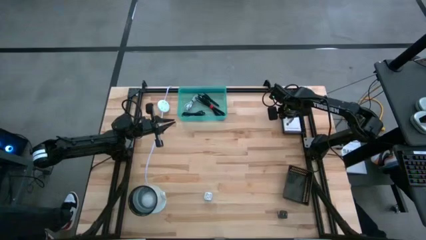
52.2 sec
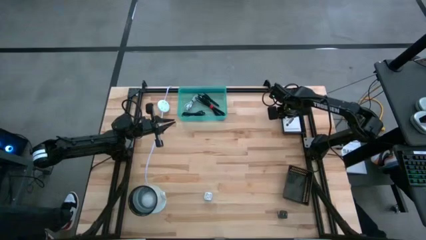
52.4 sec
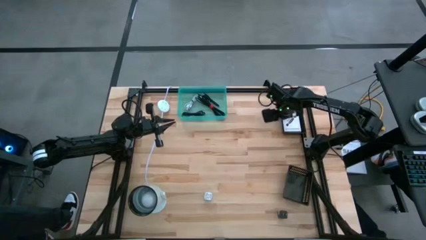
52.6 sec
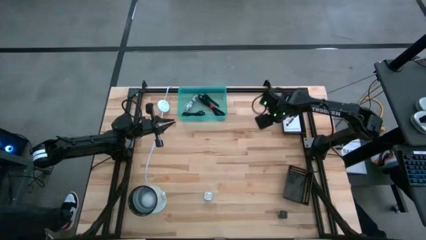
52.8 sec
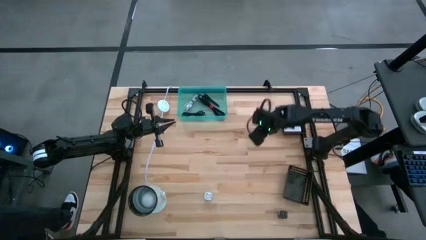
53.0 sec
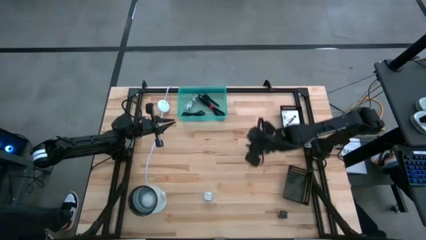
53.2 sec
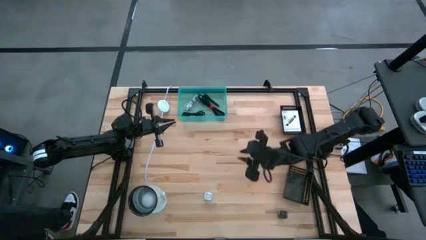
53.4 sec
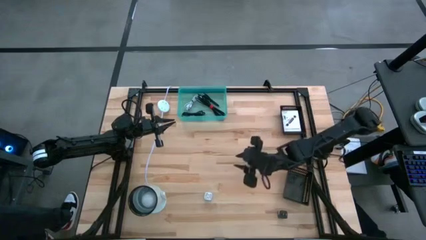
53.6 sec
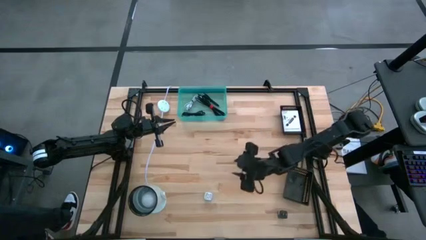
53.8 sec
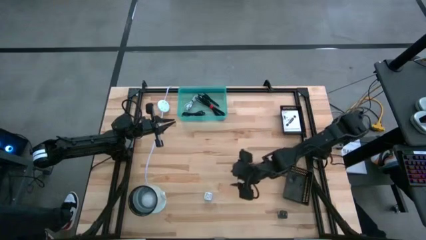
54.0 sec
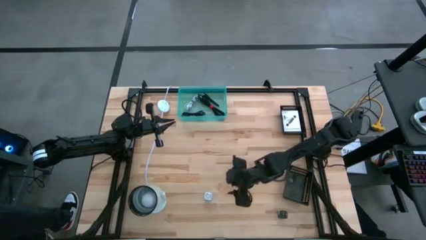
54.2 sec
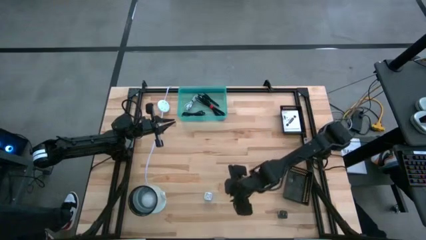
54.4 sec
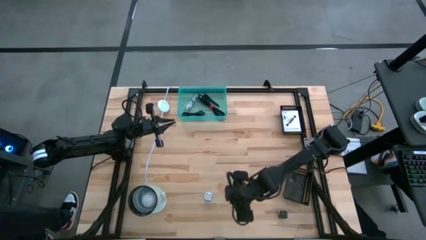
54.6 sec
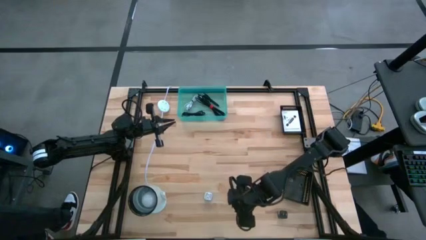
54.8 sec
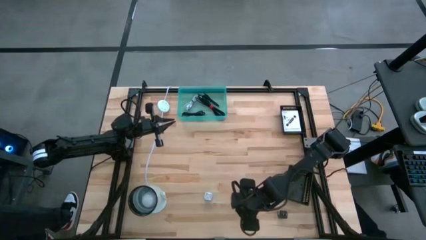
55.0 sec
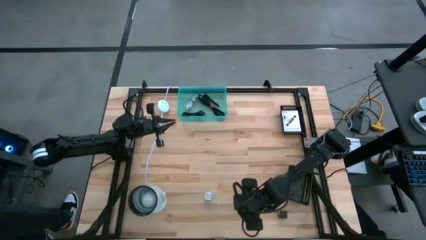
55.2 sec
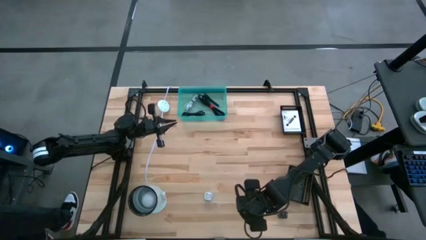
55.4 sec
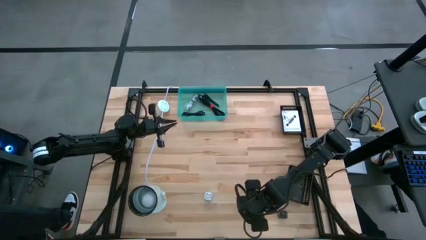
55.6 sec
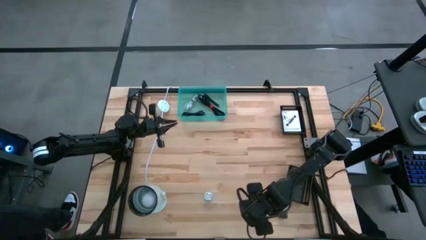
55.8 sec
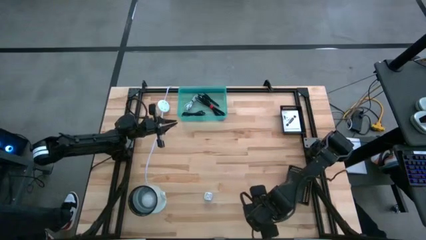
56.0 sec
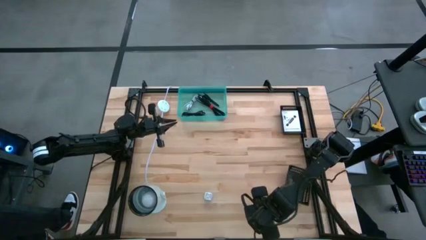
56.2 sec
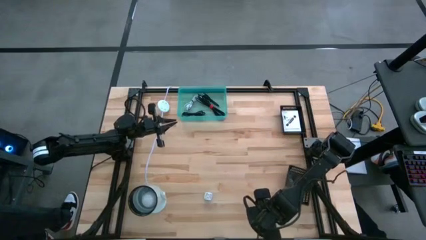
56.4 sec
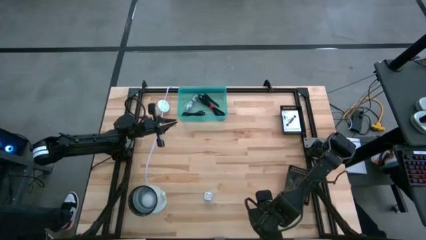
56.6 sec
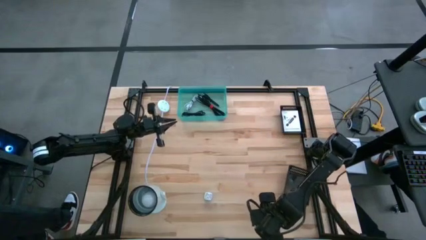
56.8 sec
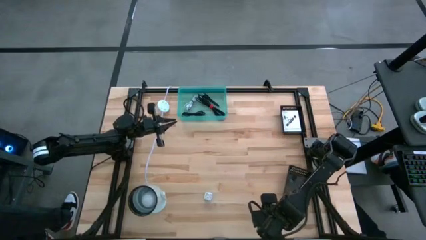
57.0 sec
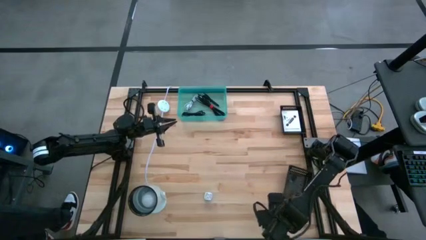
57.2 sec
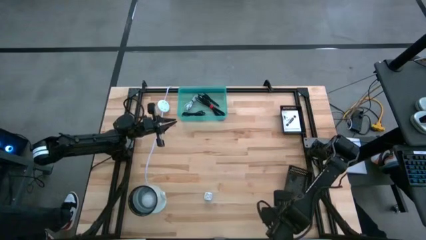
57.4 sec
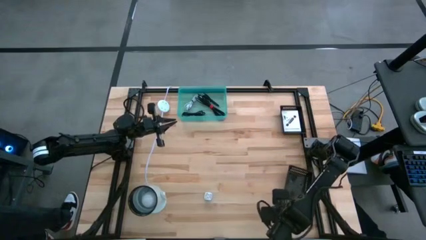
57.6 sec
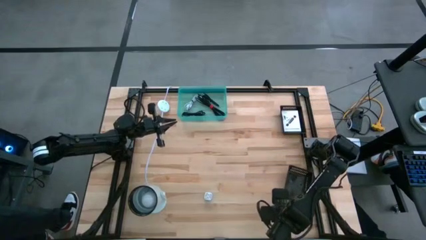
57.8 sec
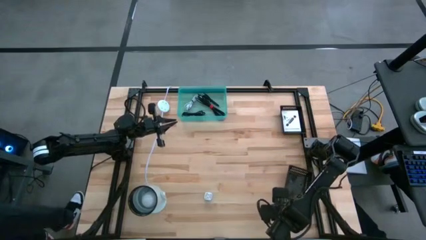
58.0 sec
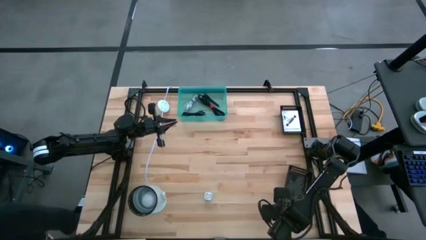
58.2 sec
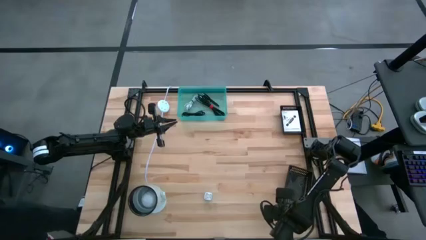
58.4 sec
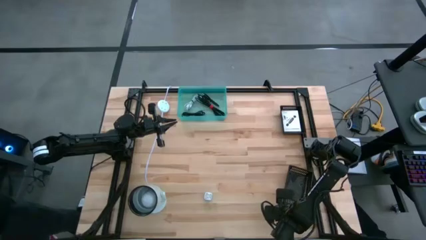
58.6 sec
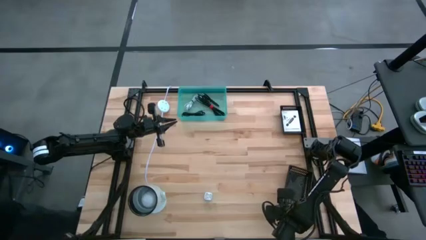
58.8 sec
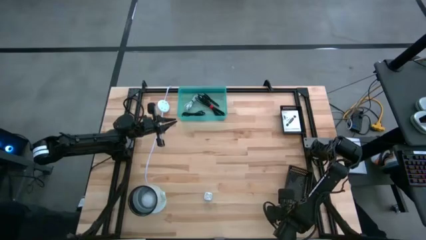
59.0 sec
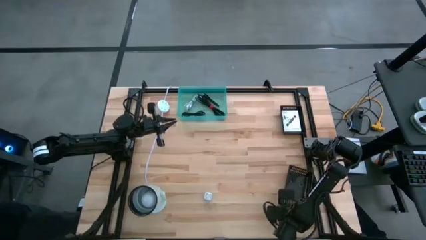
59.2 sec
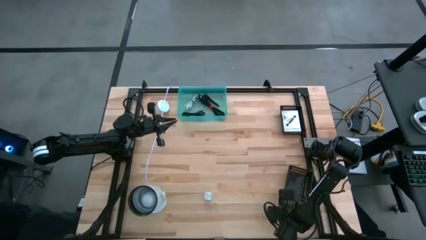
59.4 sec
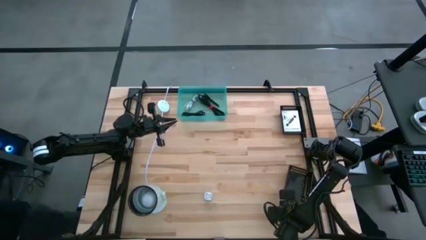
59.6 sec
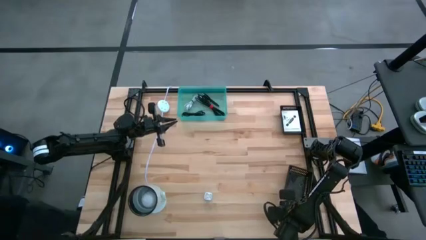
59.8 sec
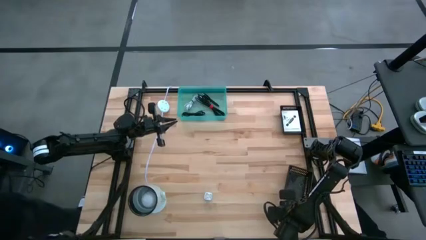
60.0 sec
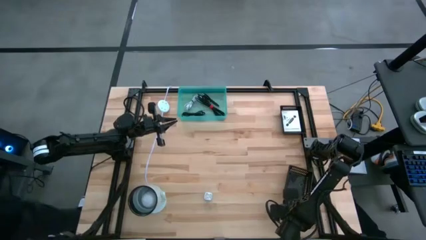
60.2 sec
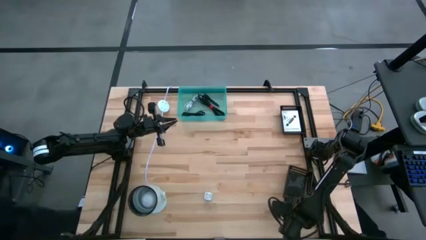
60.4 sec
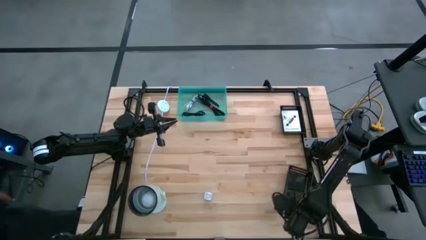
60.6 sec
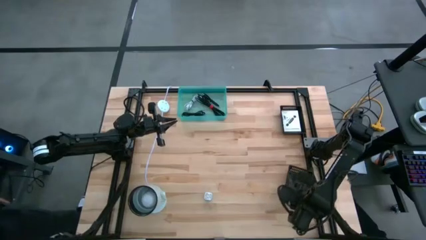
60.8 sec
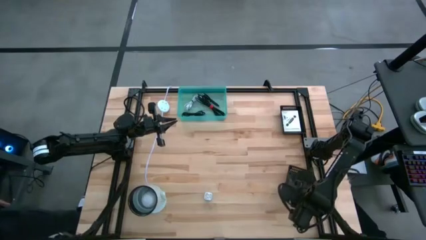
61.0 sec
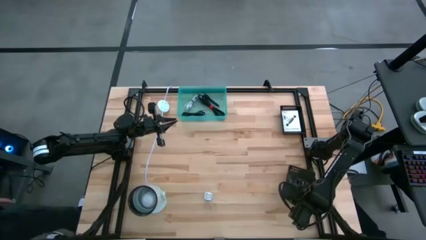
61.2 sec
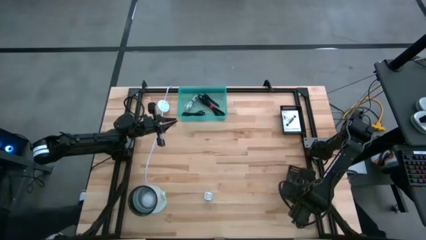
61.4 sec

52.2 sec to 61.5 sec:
Task: Pick and place items into bin
Put the black charger adapter into the bottom black bin

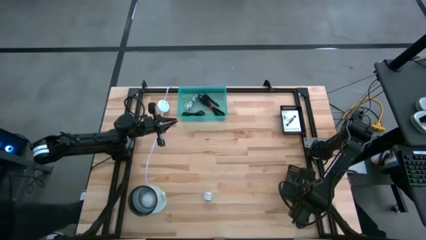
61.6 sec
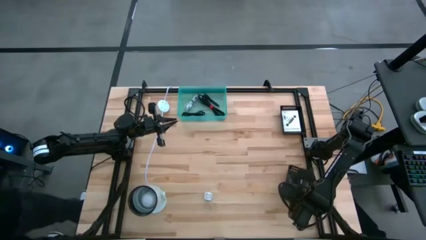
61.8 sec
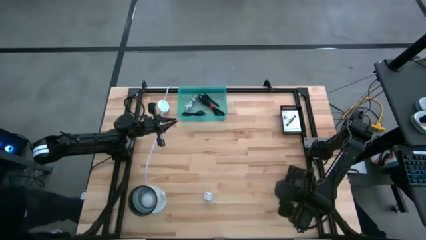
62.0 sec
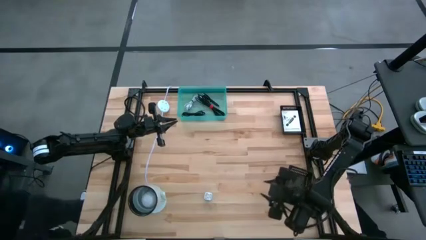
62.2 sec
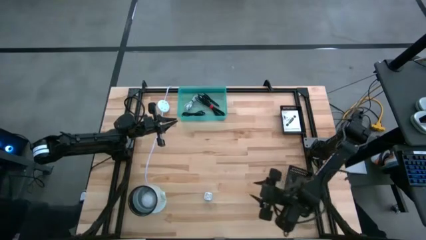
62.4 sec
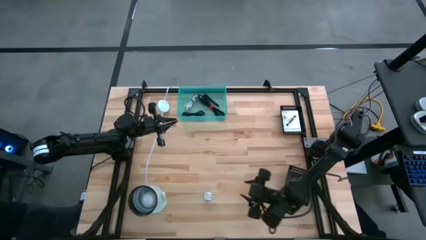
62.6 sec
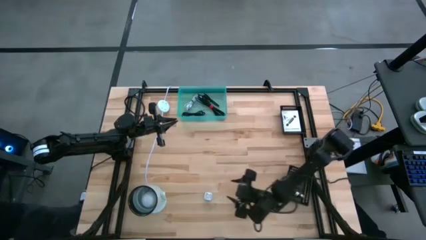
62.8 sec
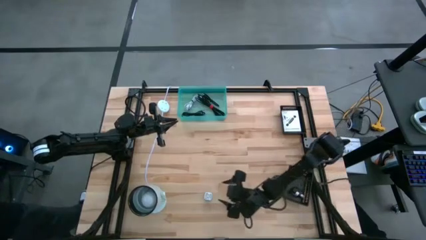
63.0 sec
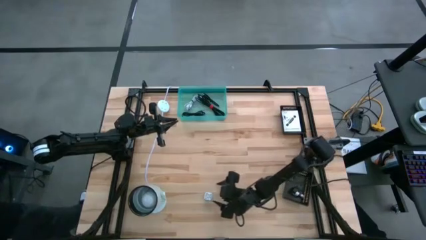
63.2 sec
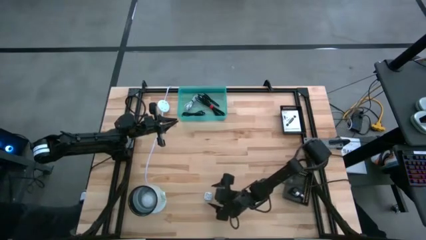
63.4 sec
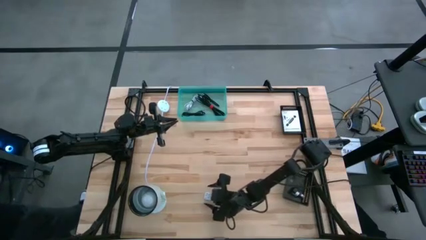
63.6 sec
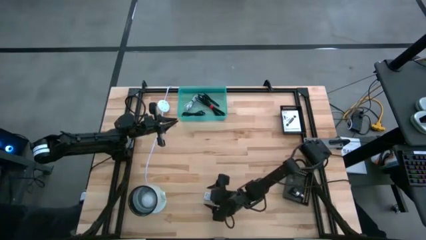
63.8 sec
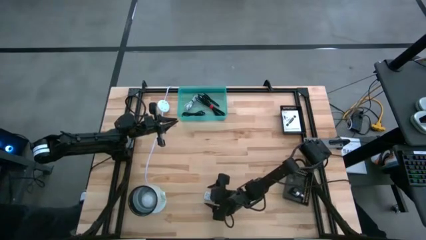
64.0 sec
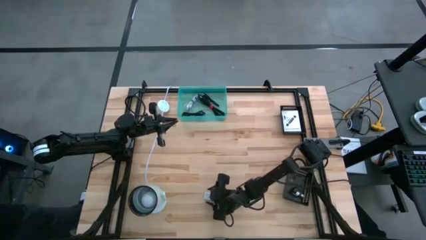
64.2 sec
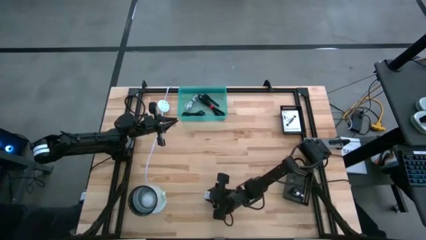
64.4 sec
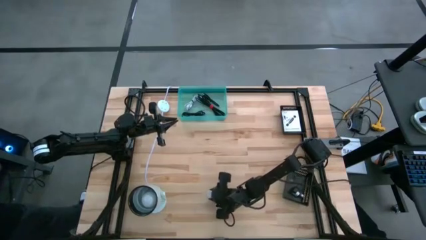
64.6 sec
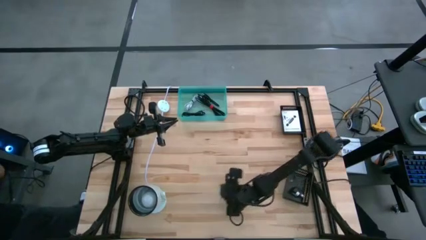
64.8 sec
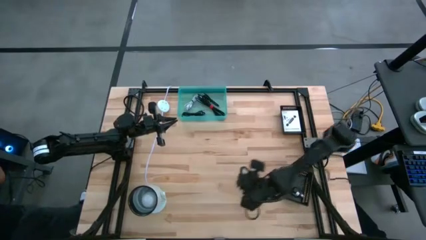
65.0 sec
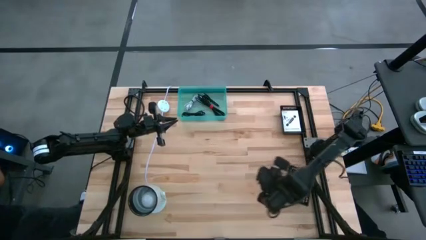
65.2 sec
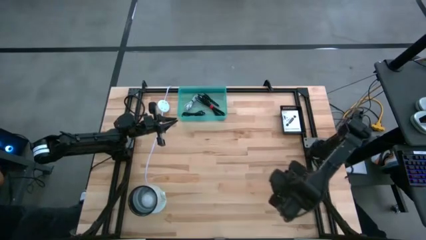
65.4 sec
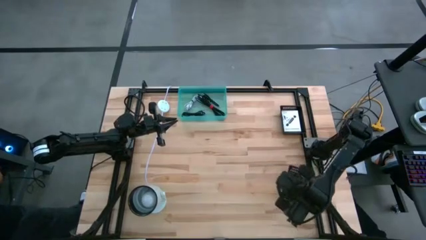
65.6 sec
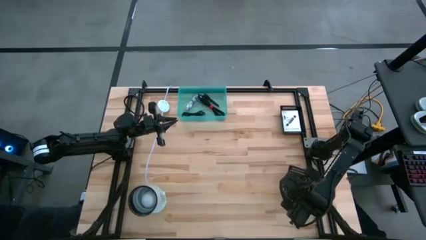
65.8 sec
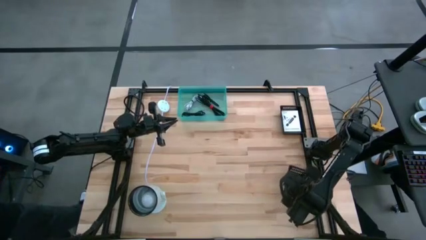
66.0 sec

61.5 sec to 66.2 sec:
Put the blue charger adapter into the bottom black bin
